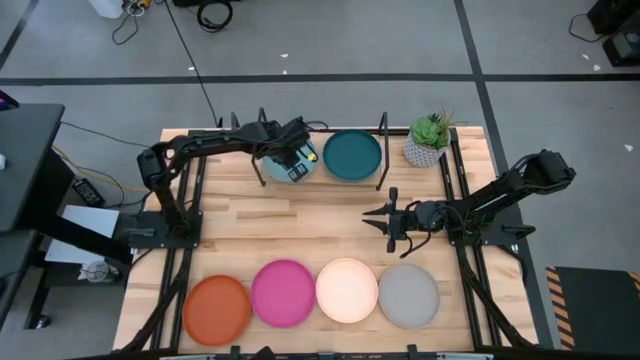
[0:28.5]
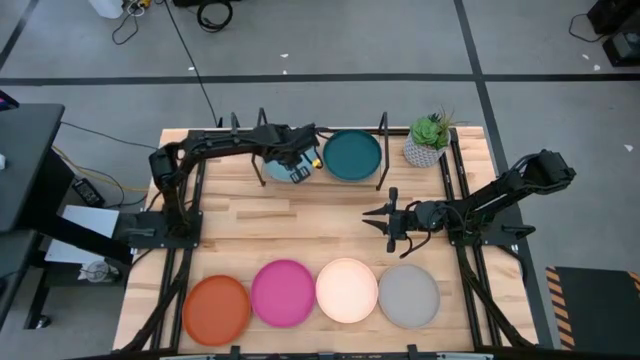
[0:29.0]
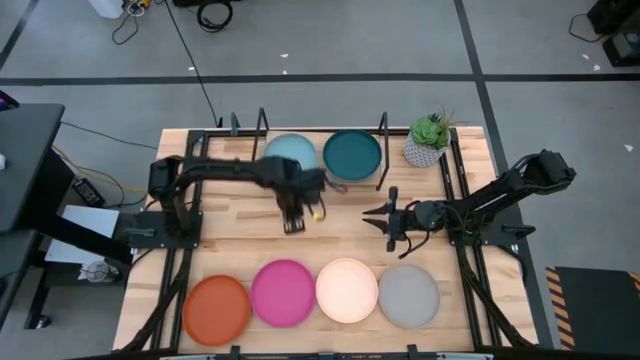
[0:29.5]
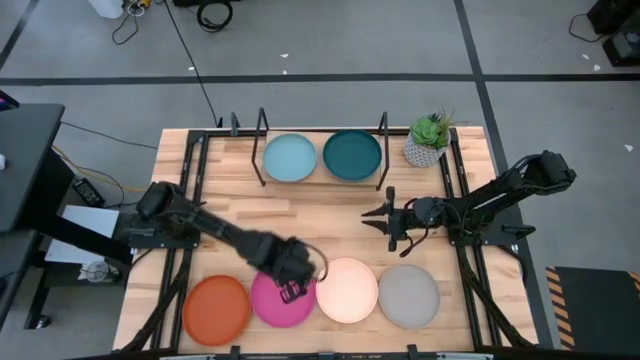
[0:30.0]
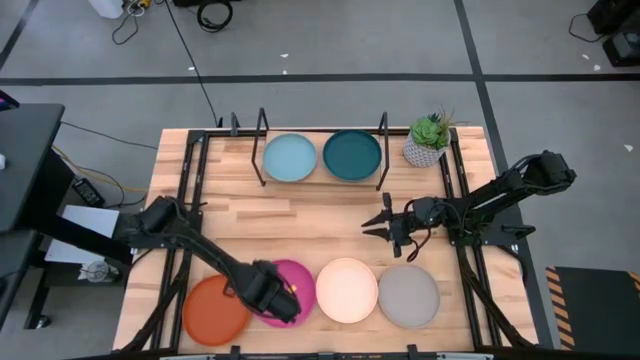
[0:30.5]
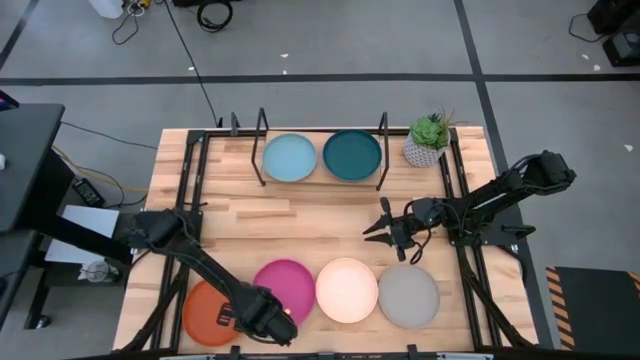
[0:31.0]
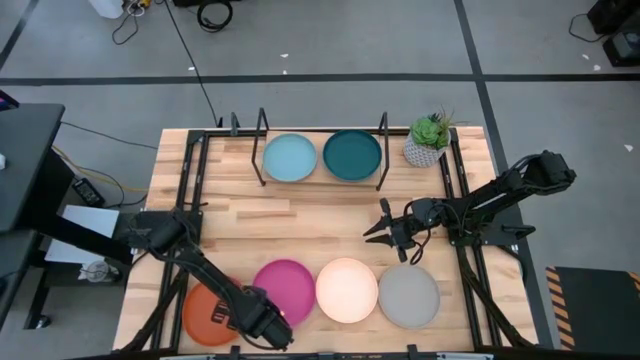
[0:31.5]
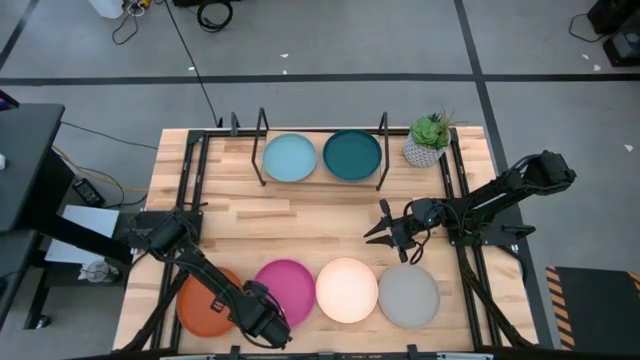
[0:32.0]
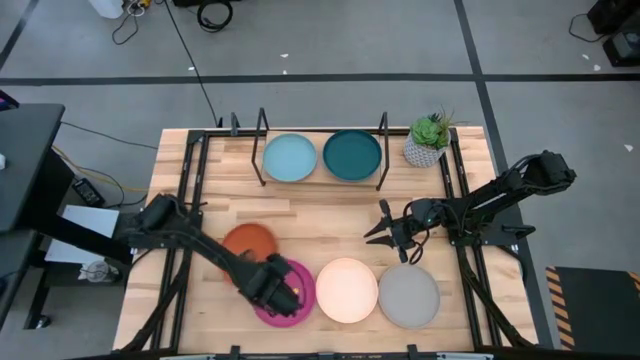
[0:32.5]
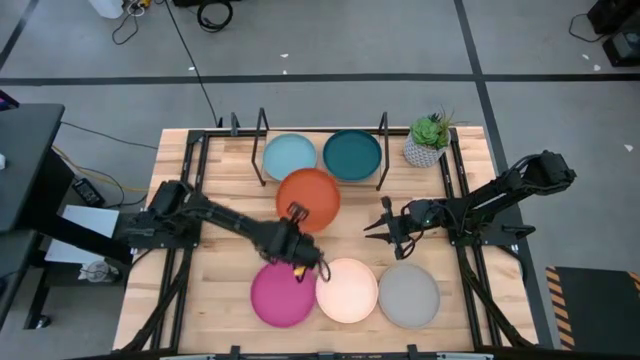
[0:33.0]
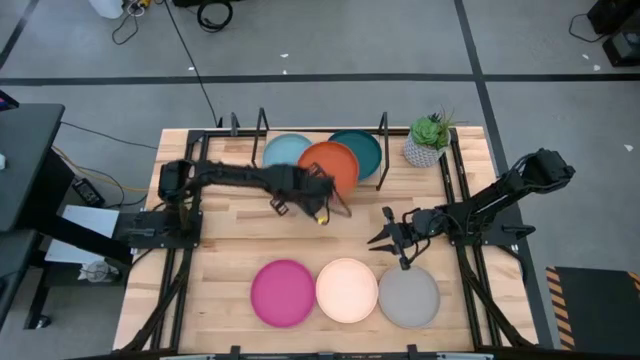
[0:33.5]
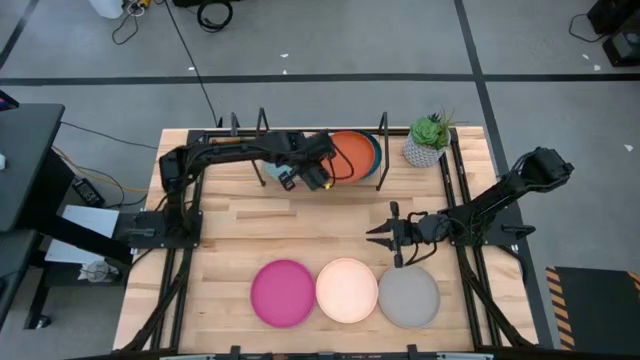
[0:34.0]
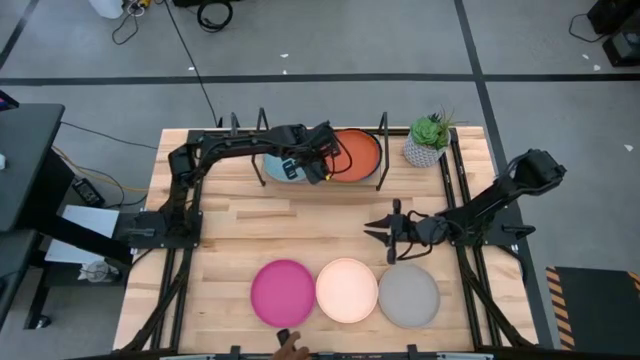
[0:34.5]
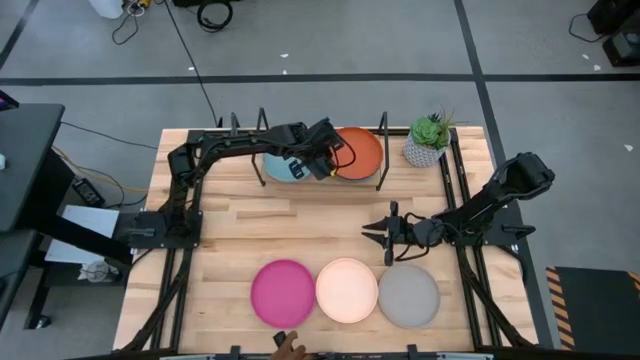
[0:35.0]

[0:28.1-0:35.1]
Task: Place and stack plates onto a shelf
Stack the orange plate onto the green plate

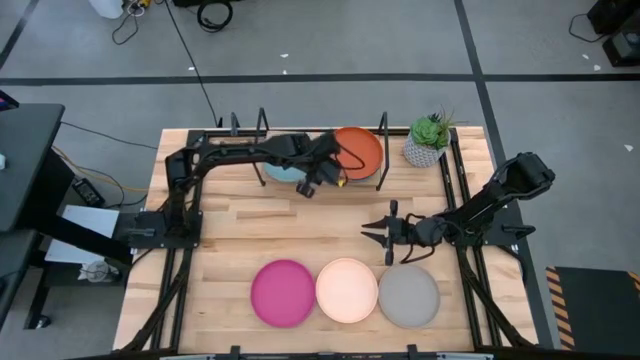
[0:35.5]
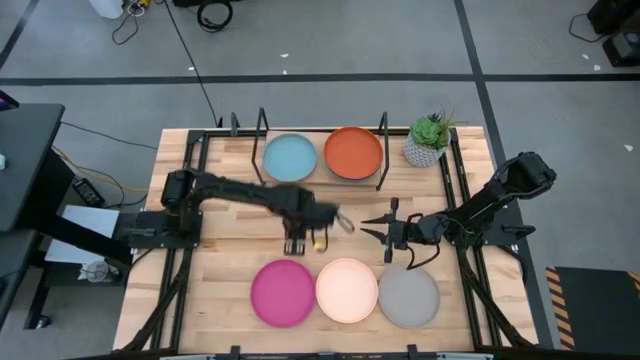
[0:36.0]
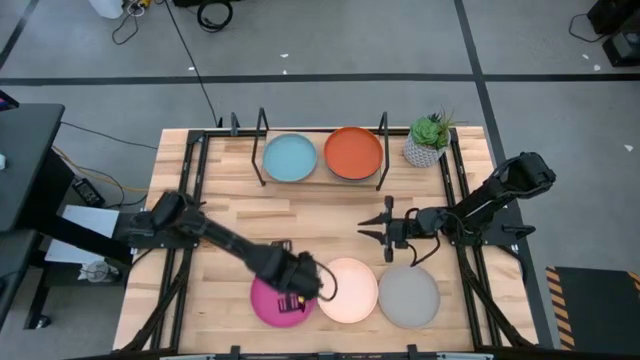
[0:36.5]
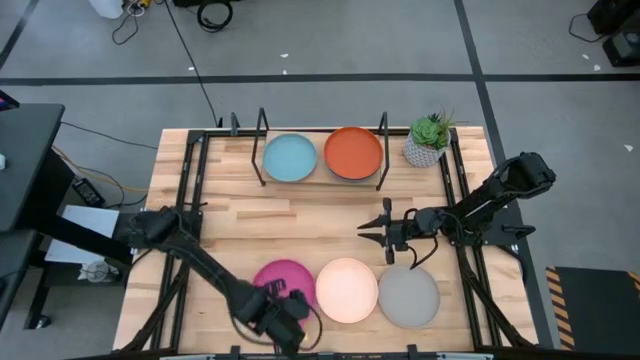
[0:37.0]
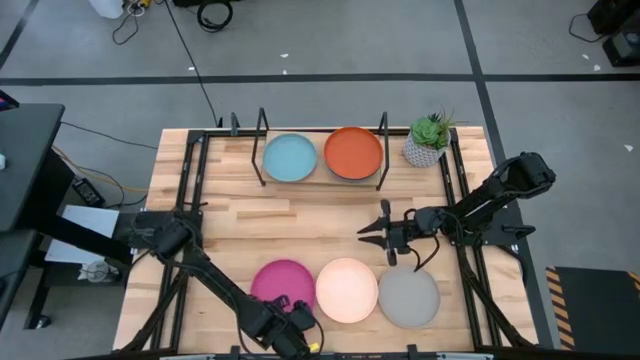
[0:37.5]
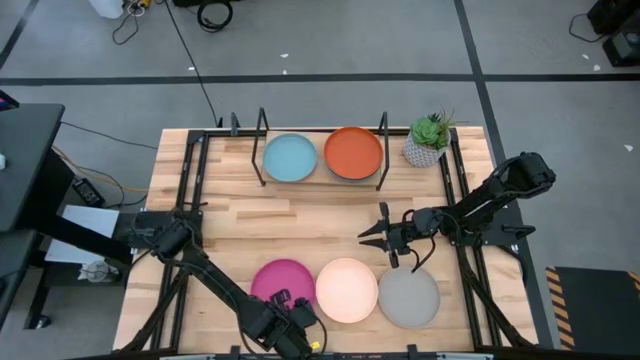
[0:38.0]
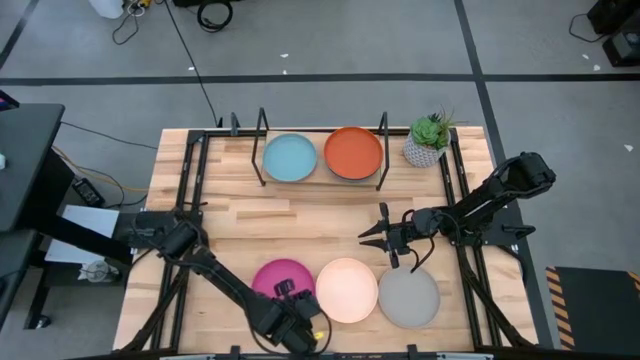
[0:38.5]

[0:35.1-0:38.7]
Stack the pink plate onto the orange plate

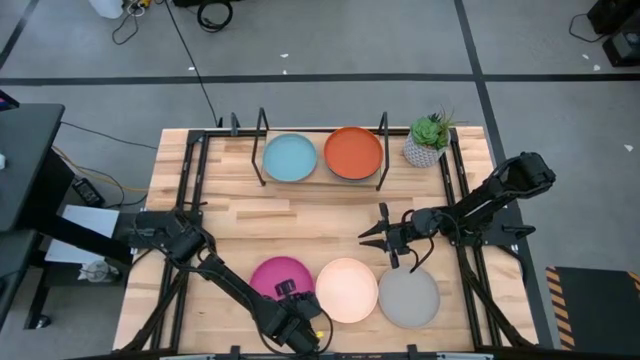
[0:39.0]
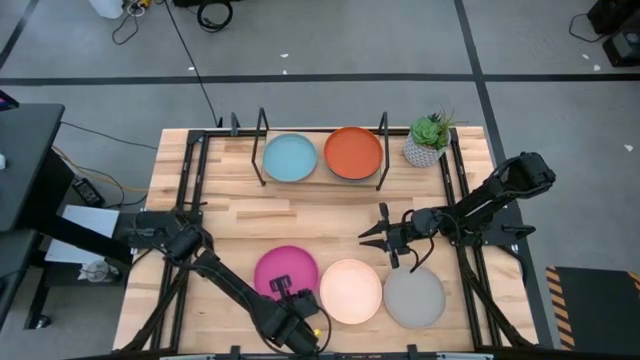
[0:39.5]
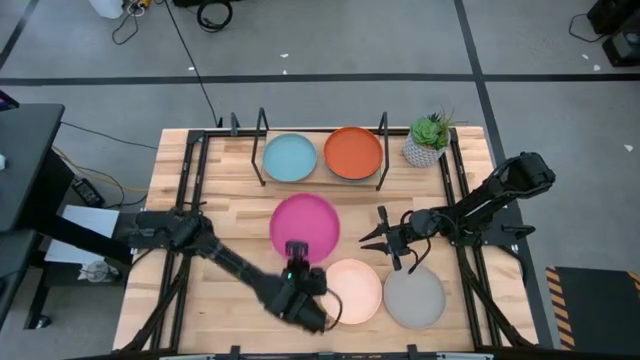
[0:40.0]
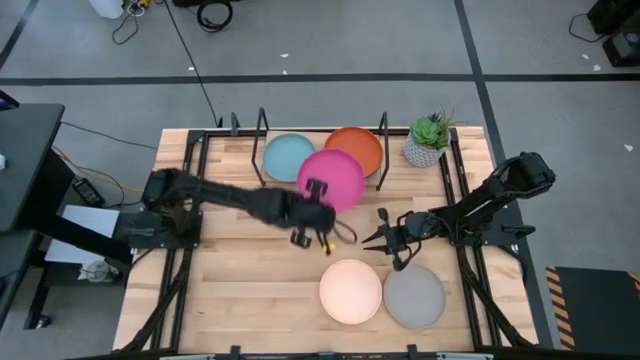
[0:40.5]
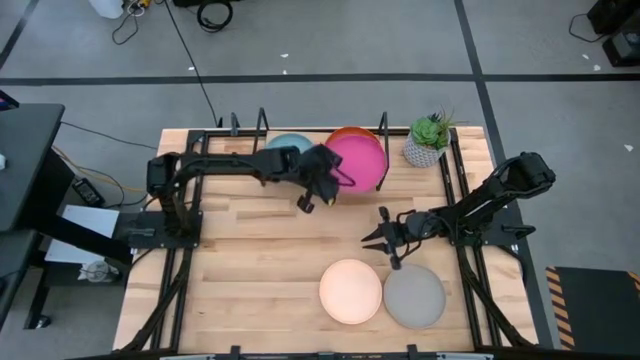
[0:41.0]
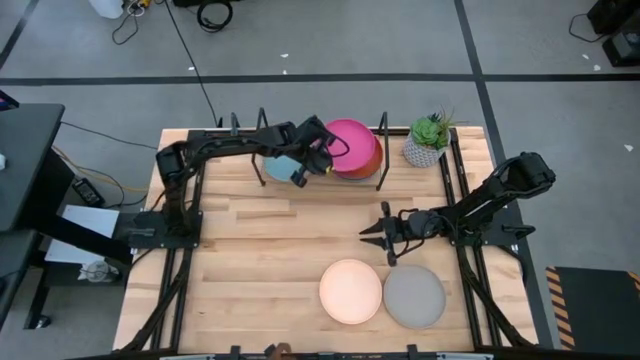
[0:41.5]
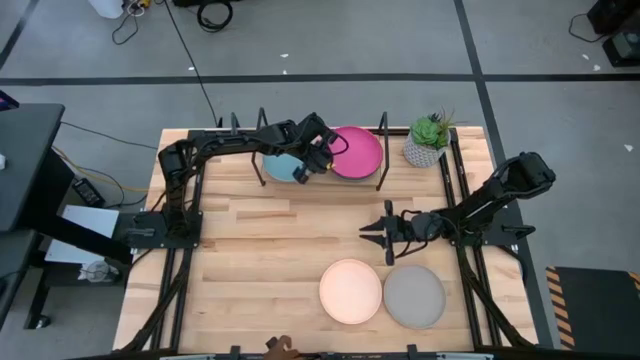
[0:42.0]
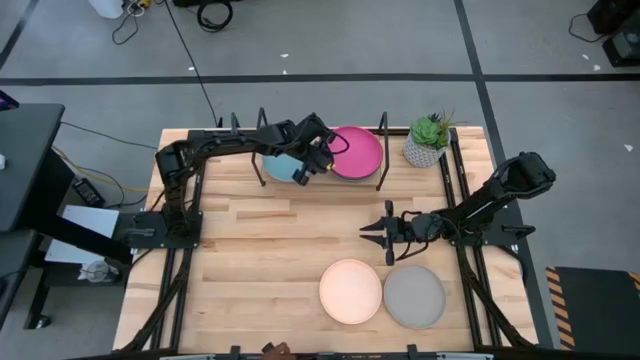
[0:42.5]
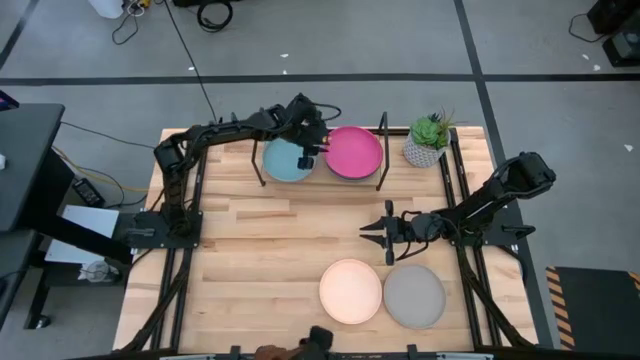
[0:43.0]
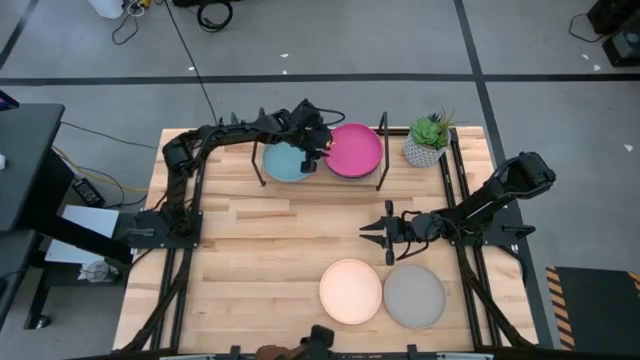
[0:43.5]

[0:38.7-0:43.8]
Stack the pink plate onto the orange plate

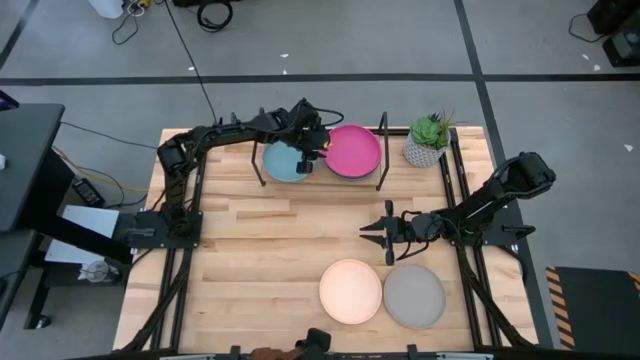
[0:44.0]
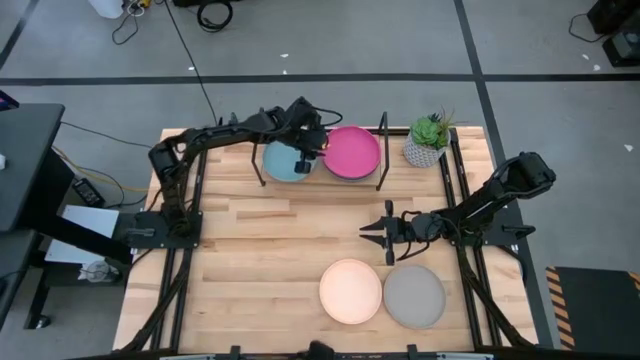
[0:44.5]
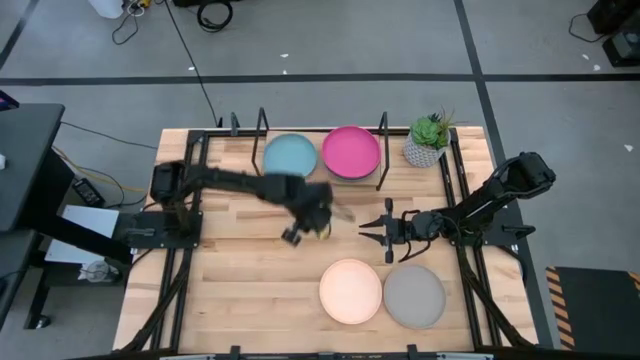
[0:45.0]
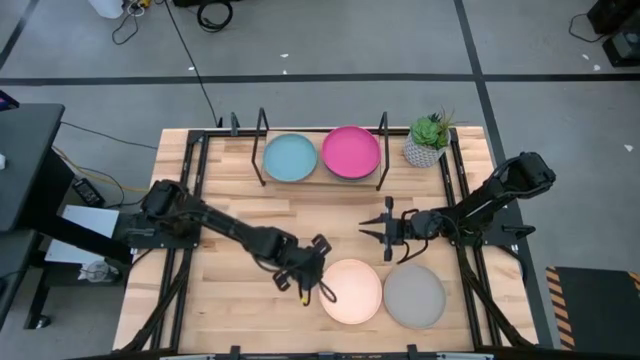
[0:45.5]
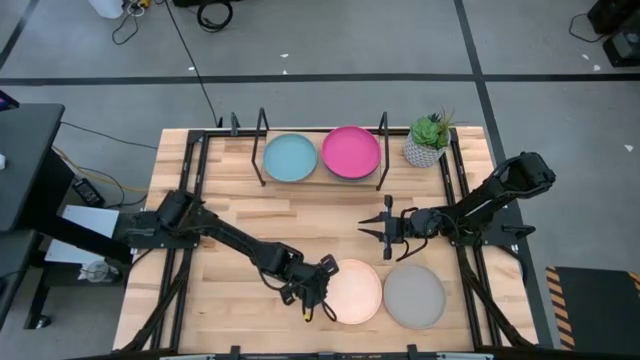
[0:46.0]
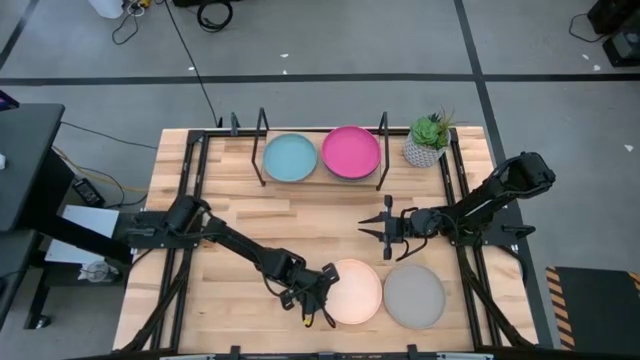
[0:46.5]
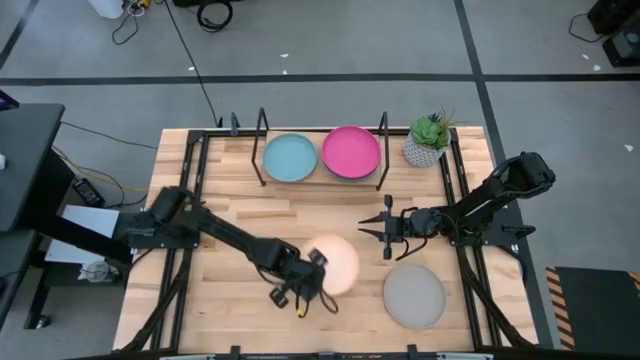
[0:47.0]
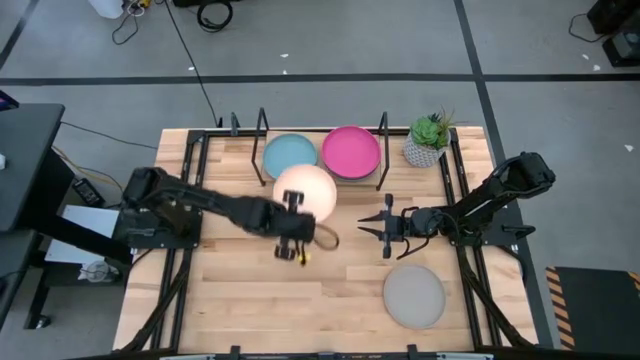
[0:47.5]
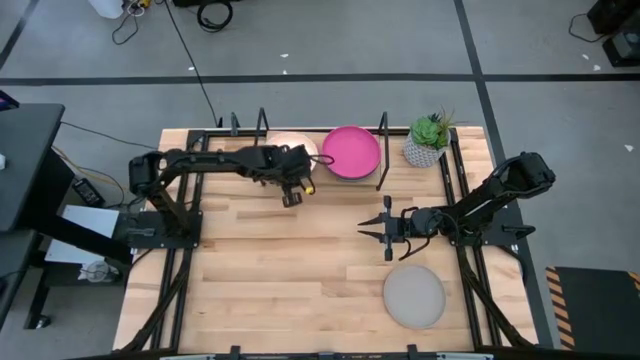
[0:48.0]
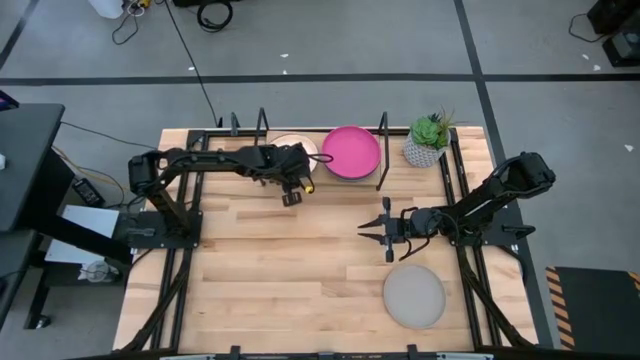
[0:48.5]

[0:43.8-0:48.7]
Stack the white plate onto the light blue plate
